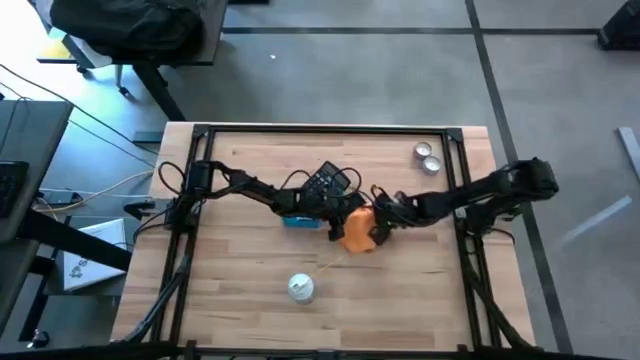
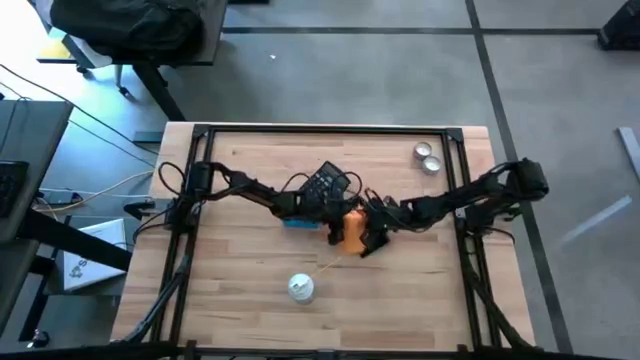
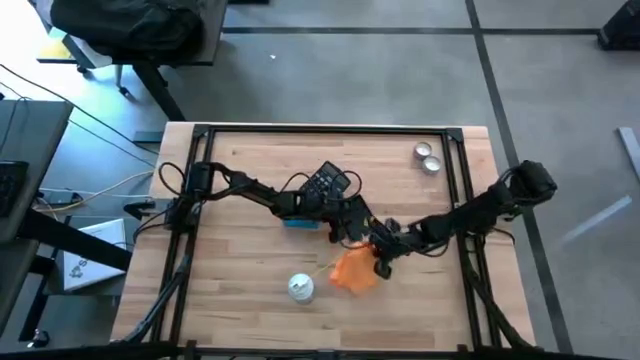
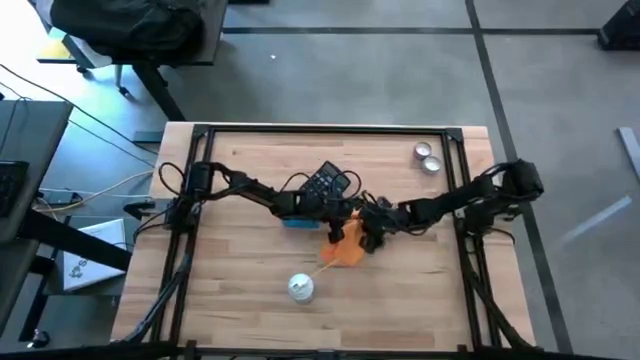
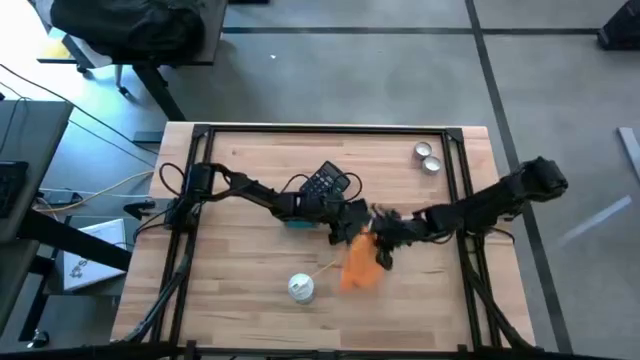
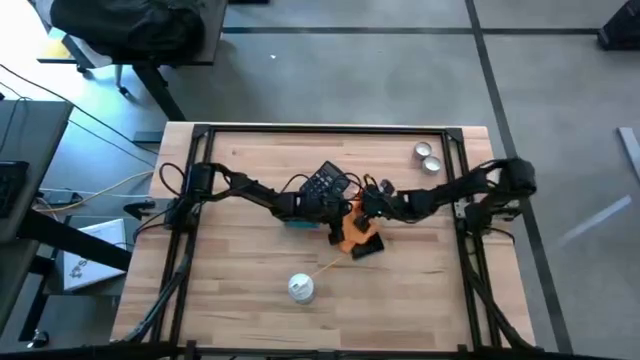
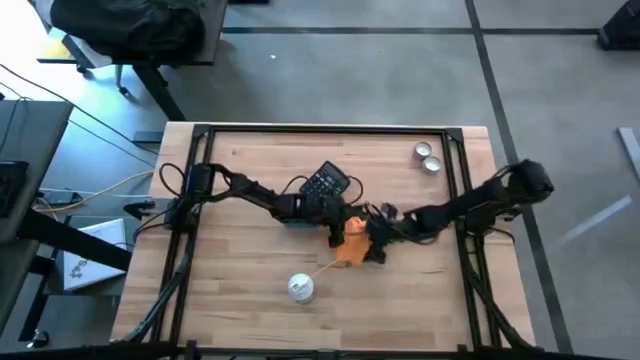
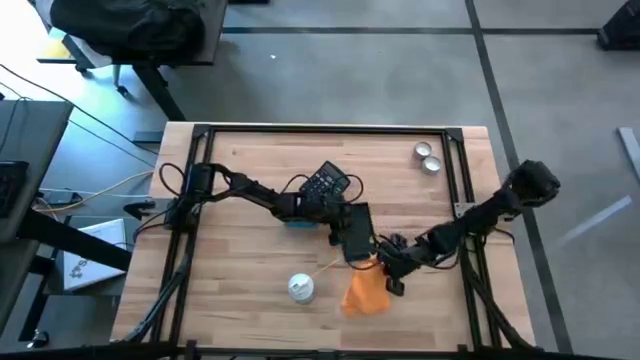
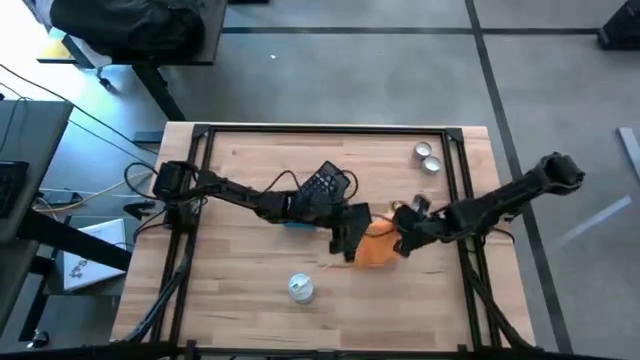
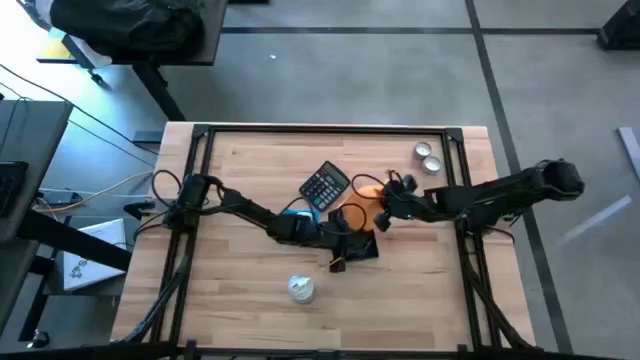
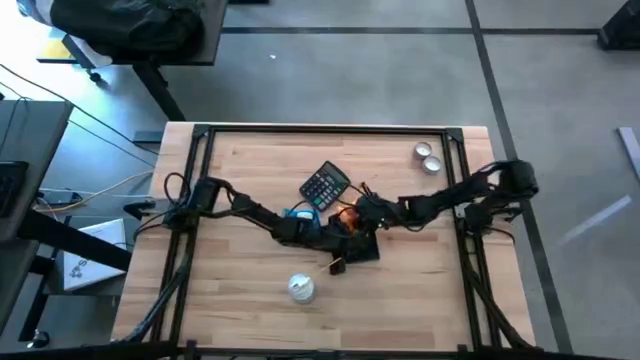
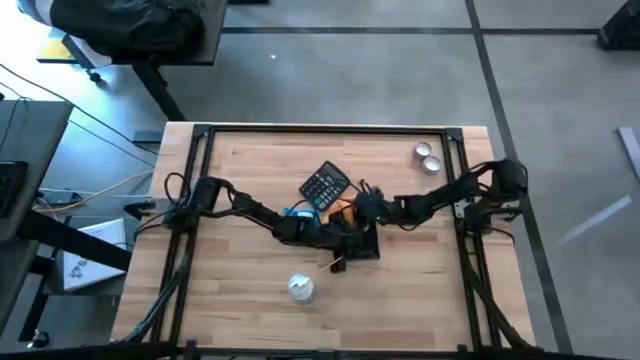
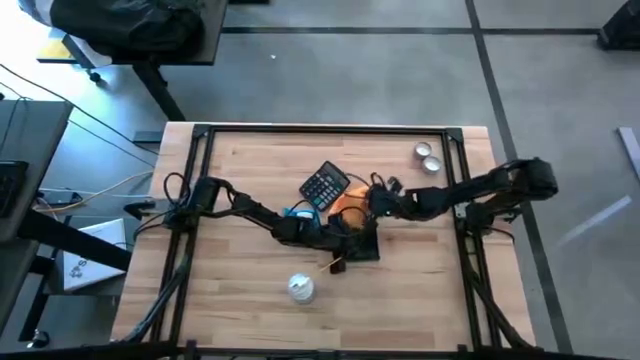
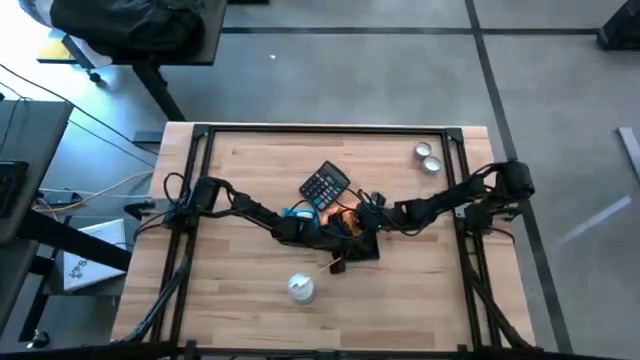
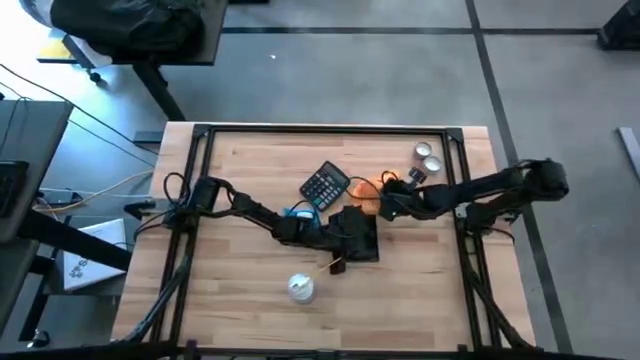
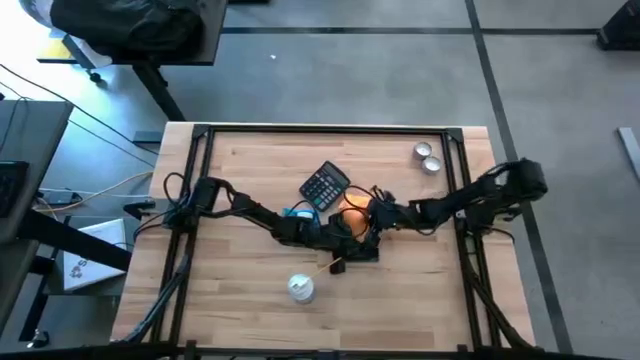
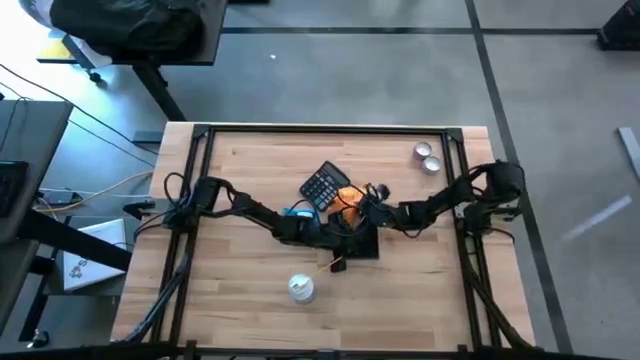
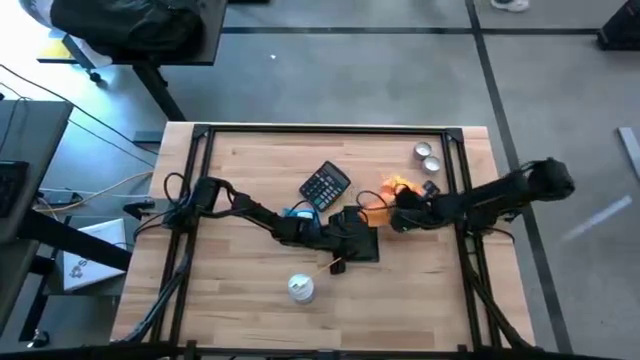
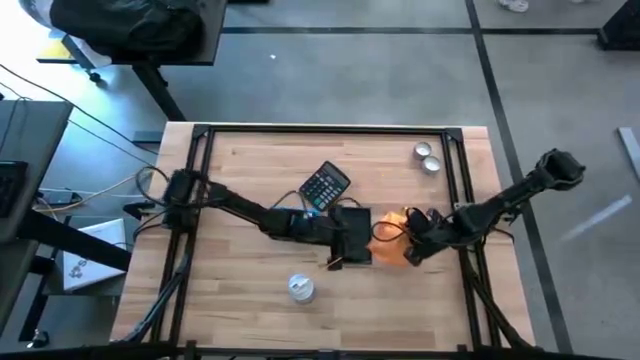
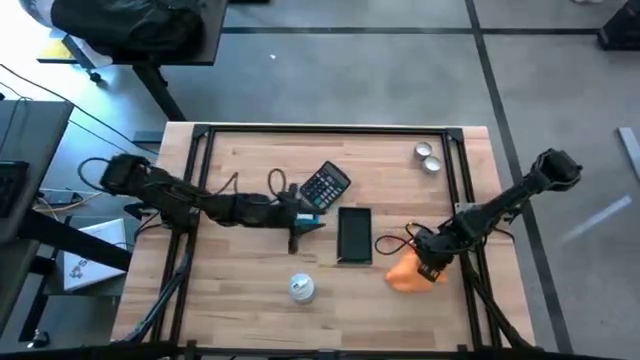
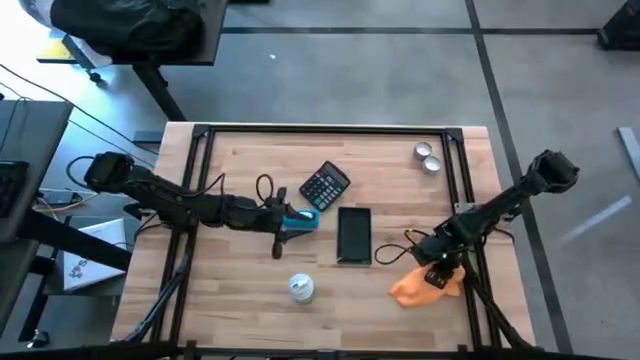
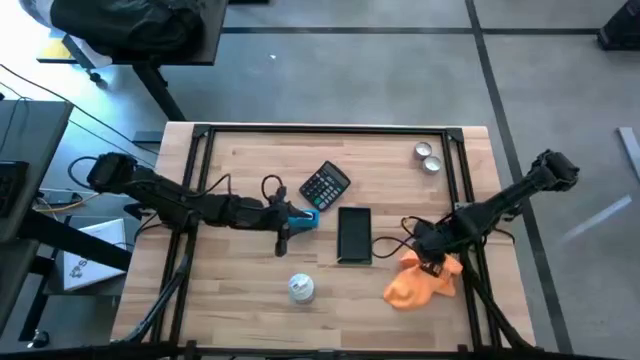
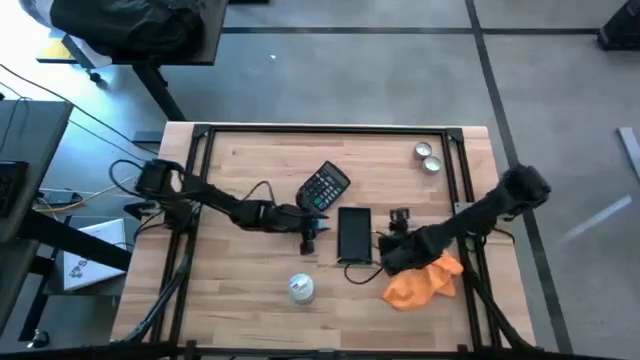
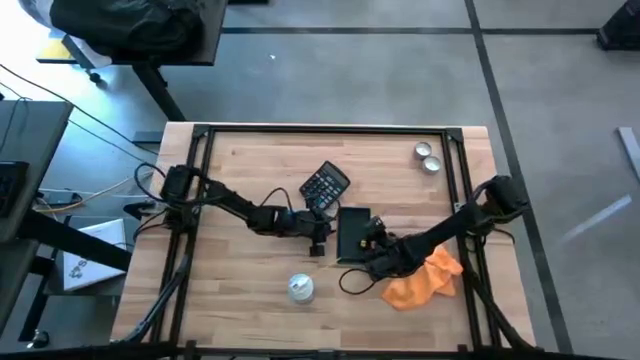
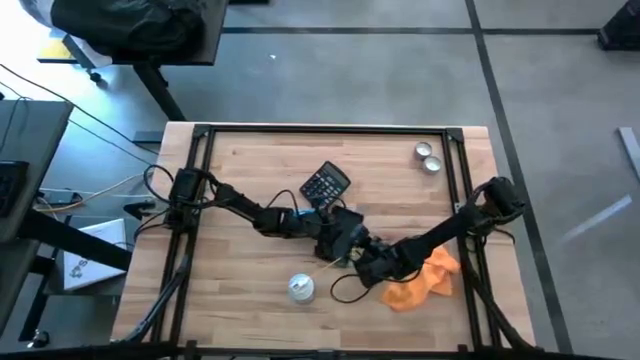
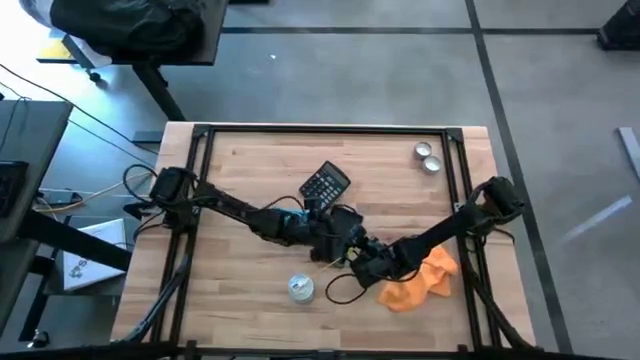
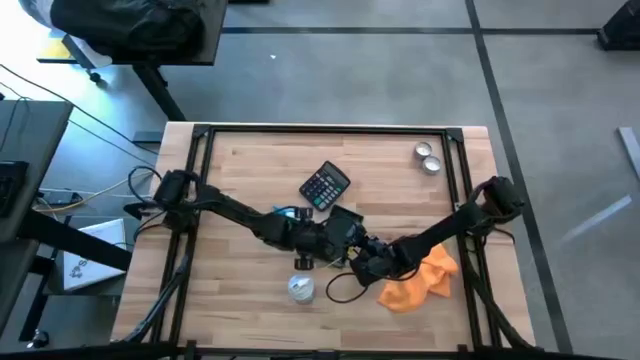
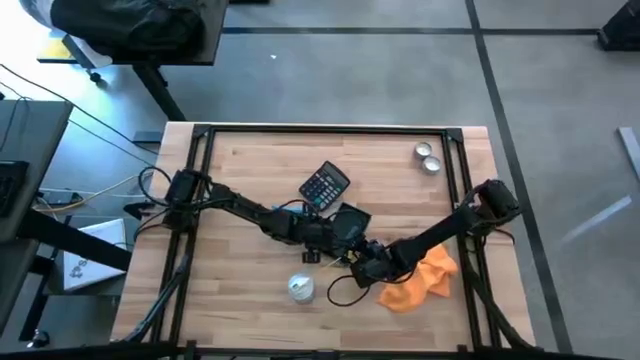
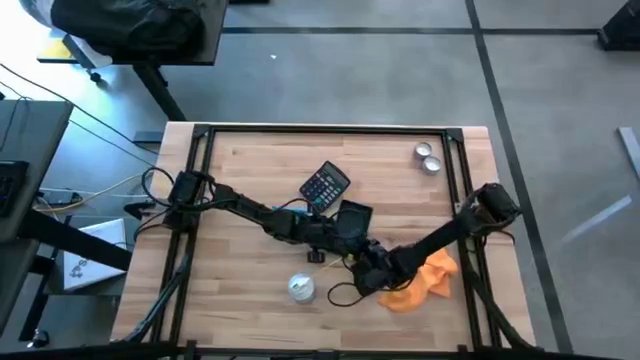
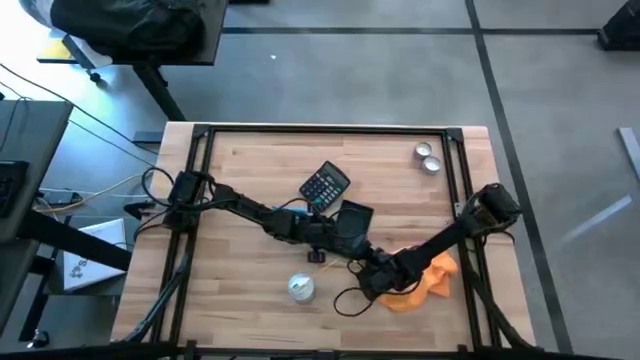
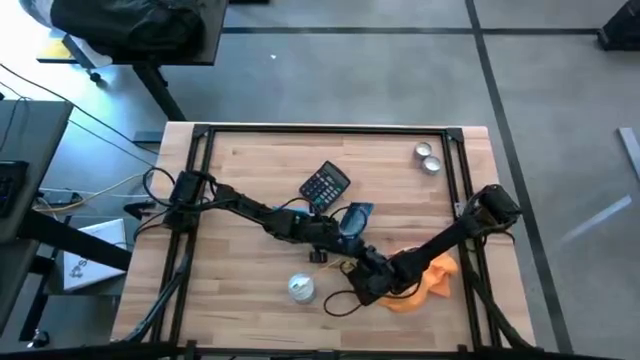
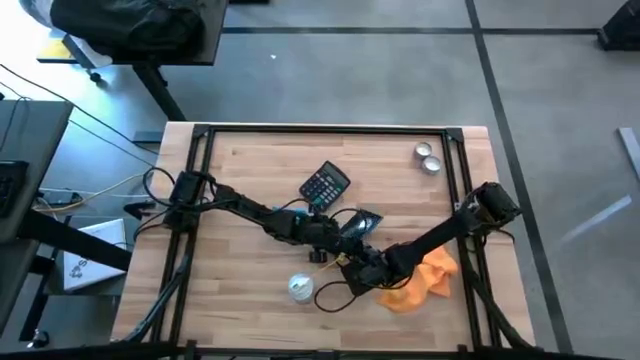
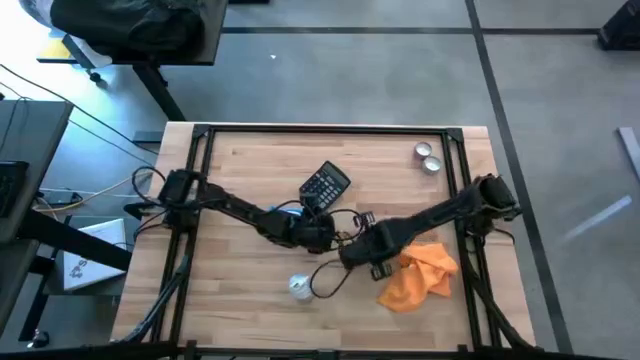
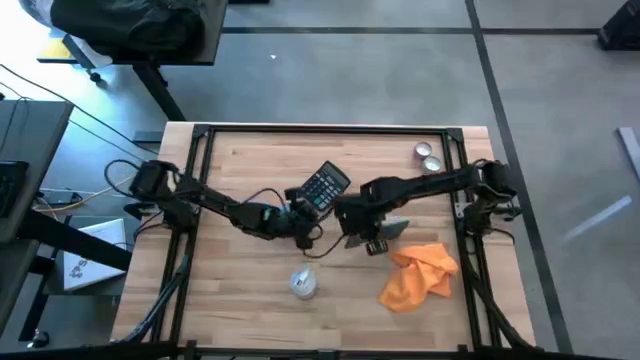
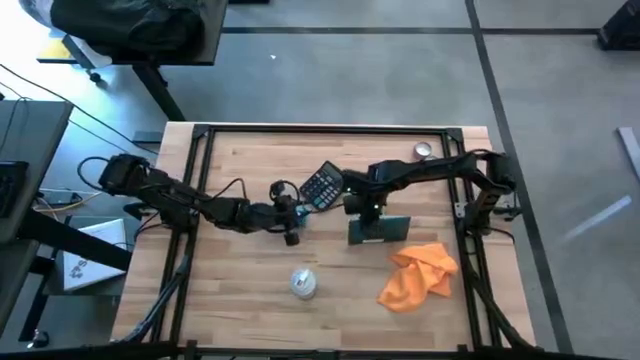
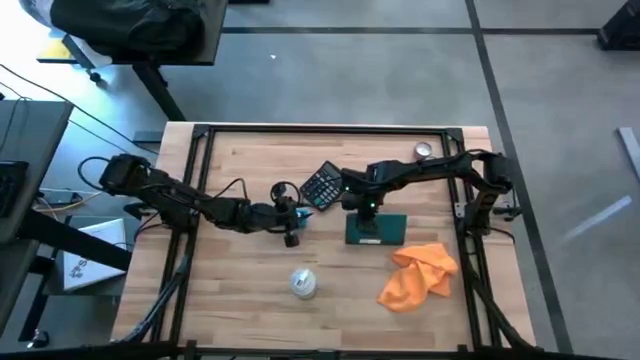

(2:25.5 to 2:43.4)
Task: Apply microfiber cloth
Wipe the front of the cellphone using microfiber cloth

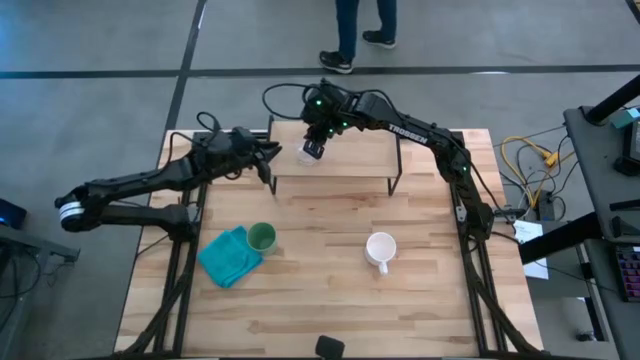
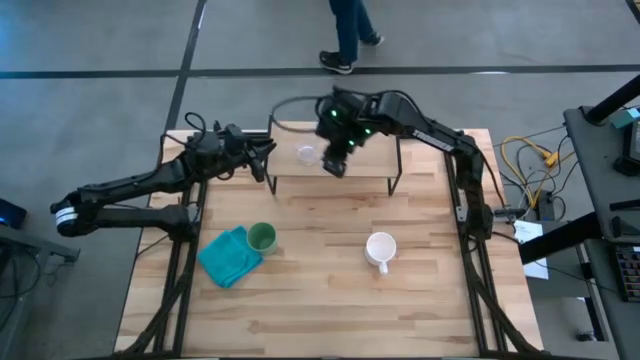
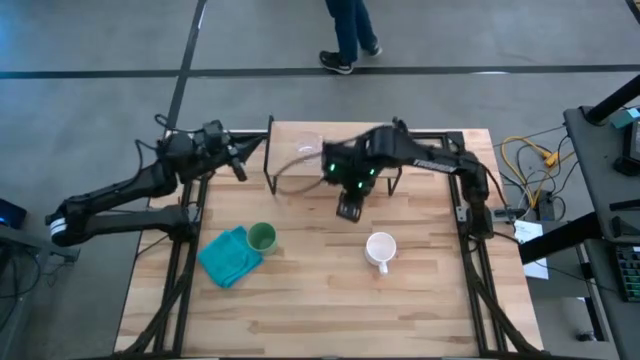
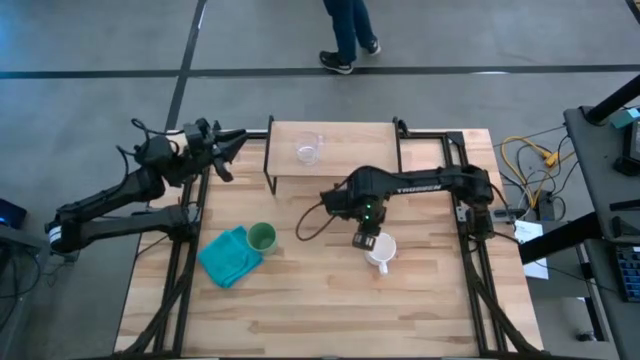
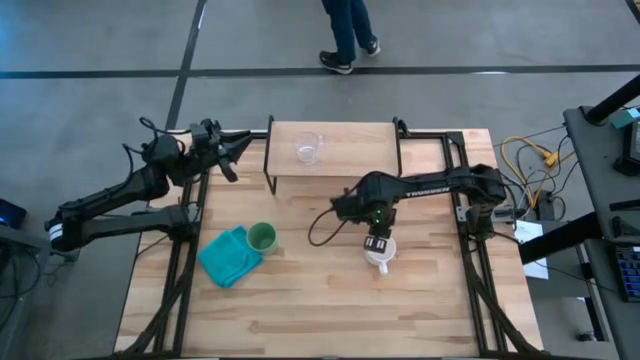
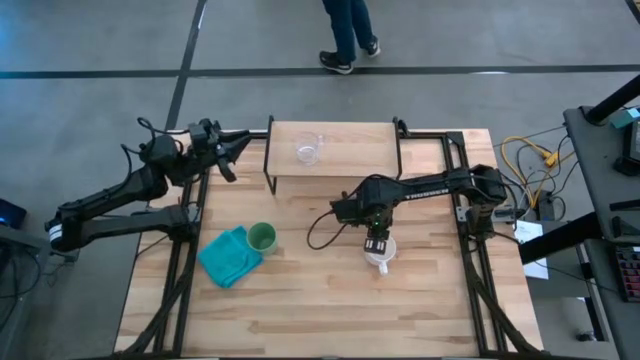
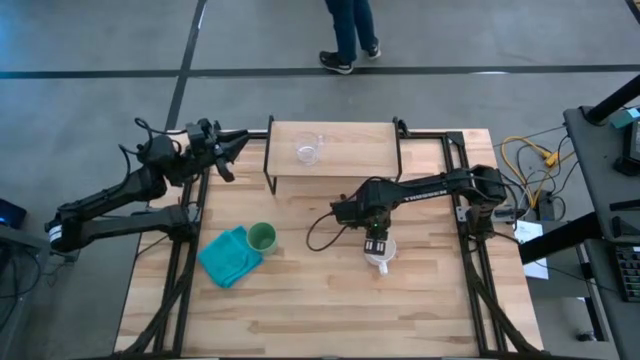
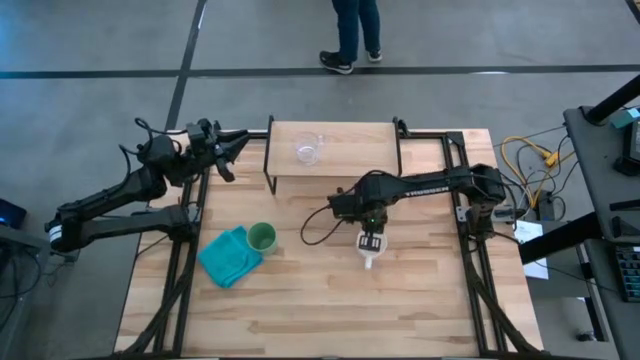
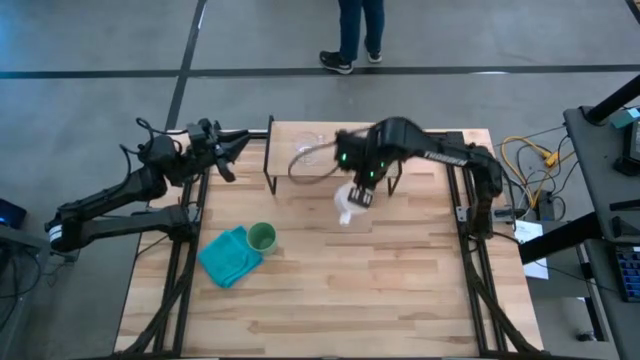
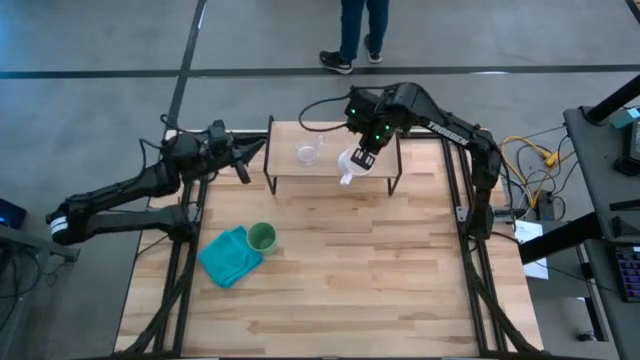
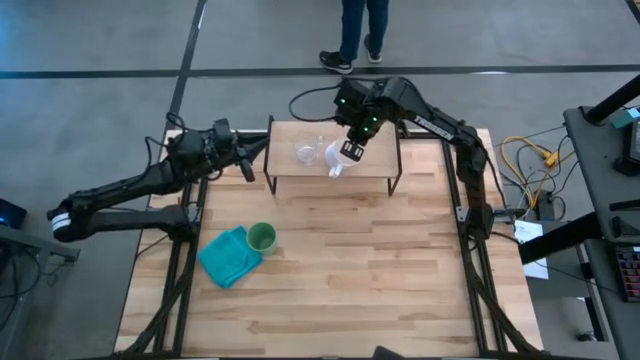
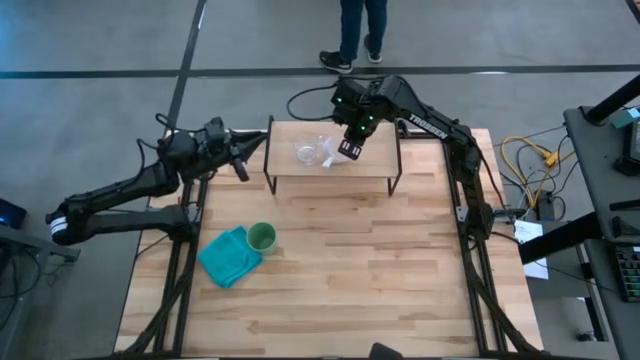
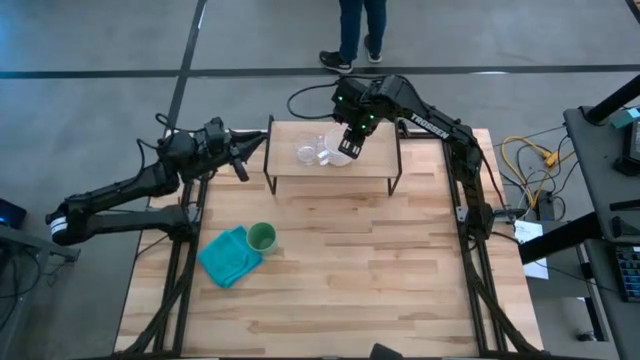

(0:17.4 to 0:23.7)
Task: Stack small to large cups/mugs on shelf
Put the white mug on the shelf
